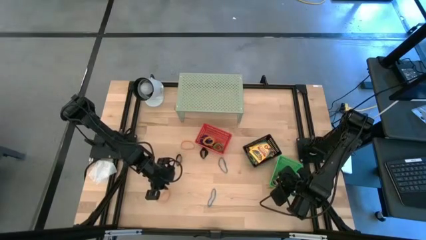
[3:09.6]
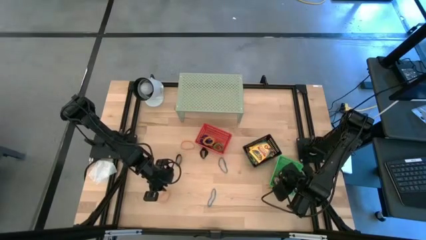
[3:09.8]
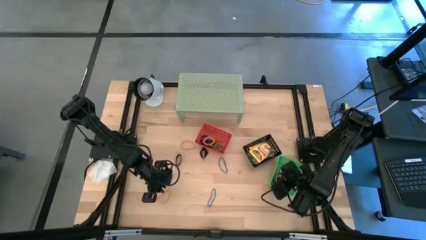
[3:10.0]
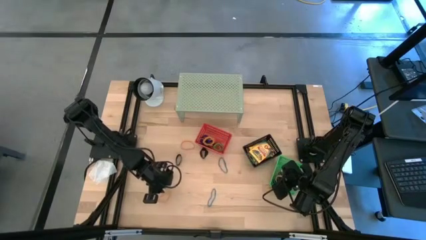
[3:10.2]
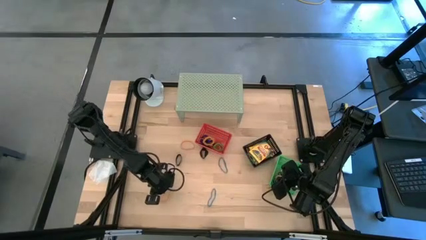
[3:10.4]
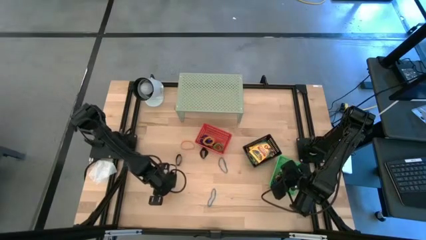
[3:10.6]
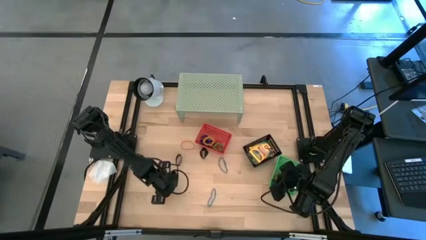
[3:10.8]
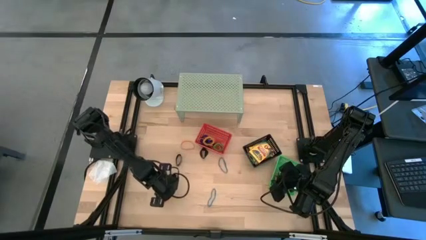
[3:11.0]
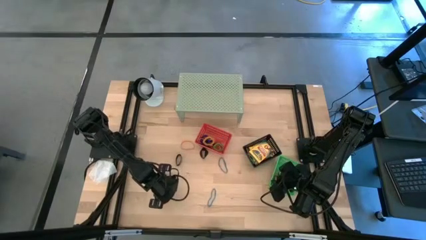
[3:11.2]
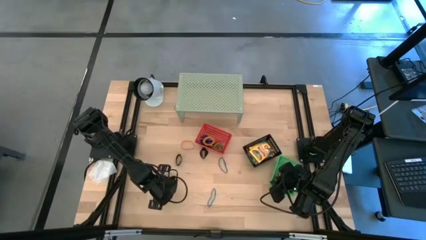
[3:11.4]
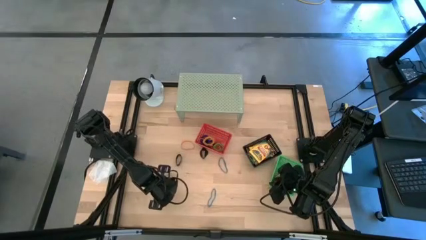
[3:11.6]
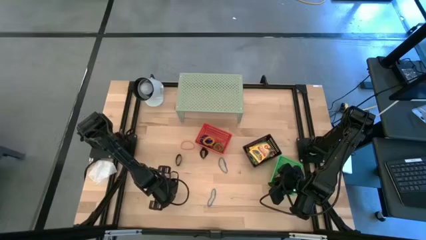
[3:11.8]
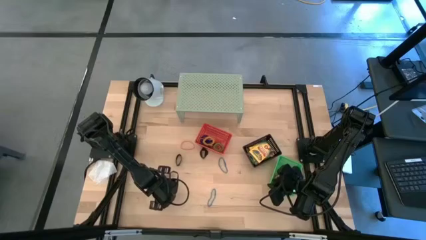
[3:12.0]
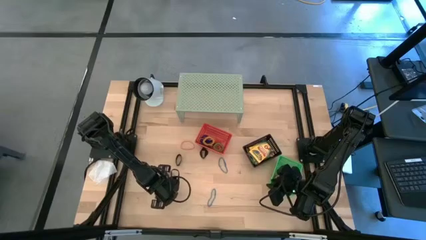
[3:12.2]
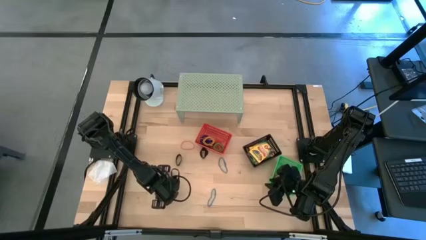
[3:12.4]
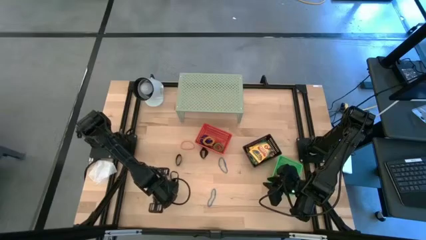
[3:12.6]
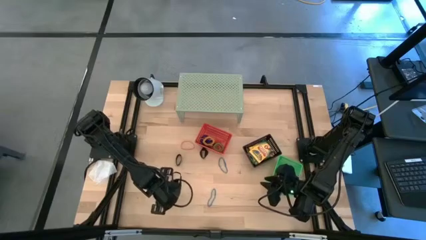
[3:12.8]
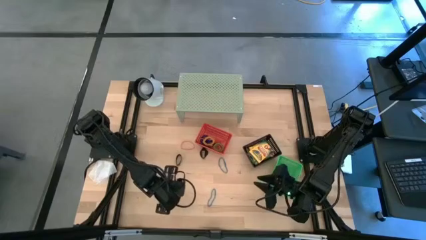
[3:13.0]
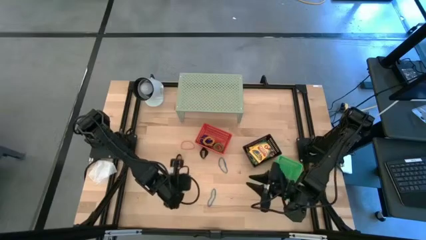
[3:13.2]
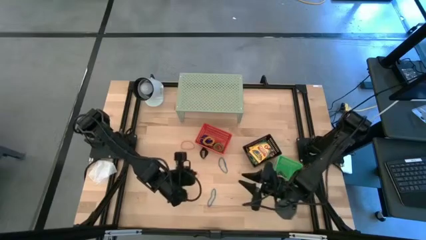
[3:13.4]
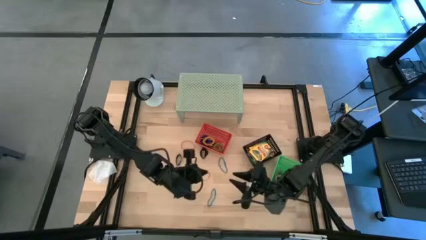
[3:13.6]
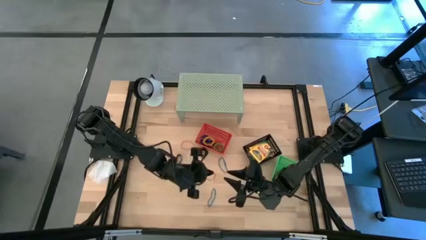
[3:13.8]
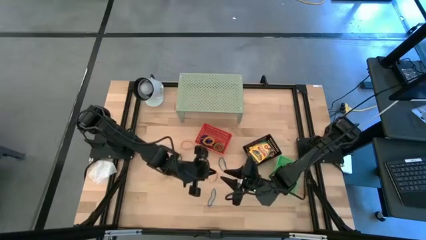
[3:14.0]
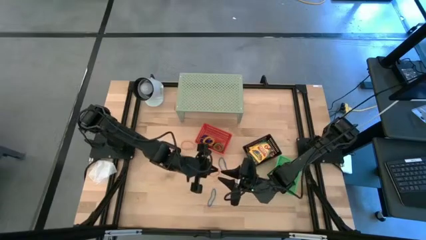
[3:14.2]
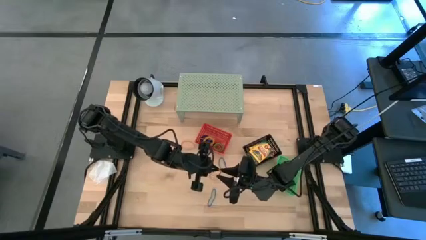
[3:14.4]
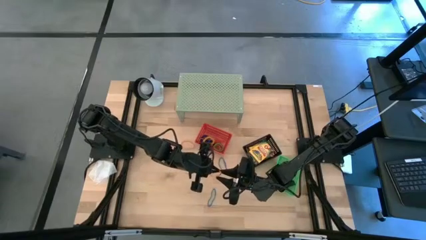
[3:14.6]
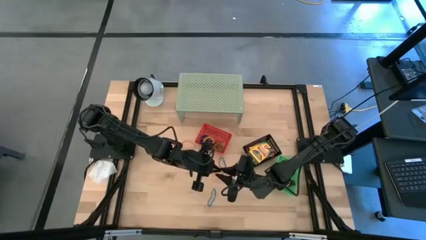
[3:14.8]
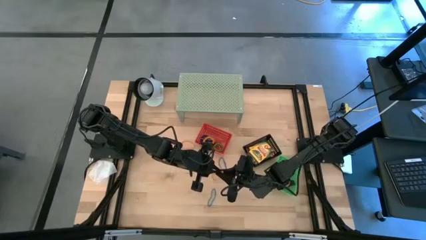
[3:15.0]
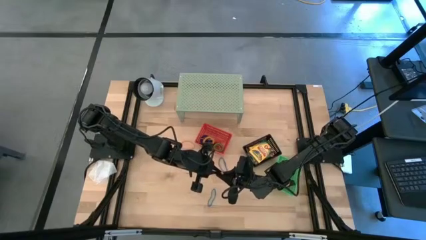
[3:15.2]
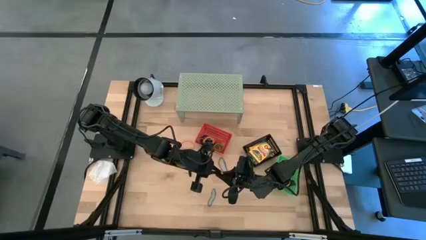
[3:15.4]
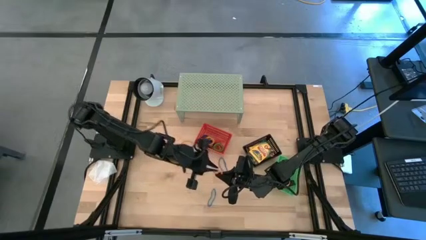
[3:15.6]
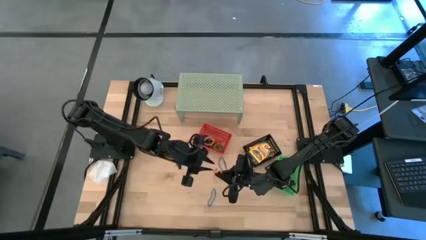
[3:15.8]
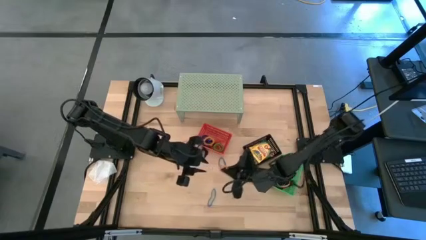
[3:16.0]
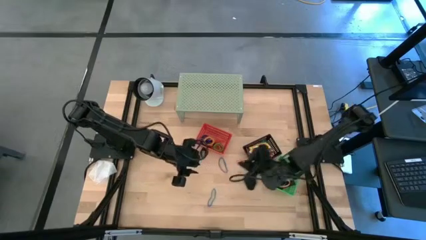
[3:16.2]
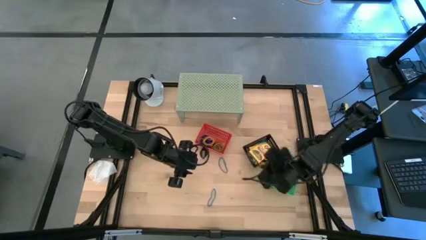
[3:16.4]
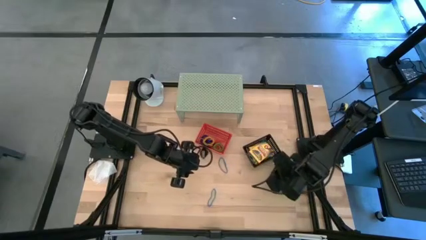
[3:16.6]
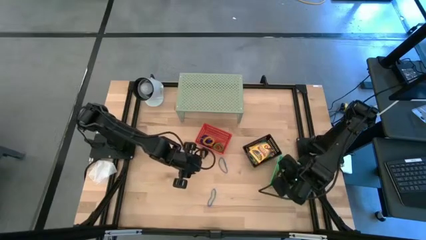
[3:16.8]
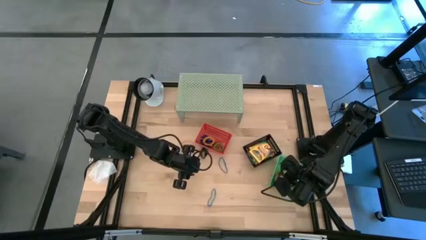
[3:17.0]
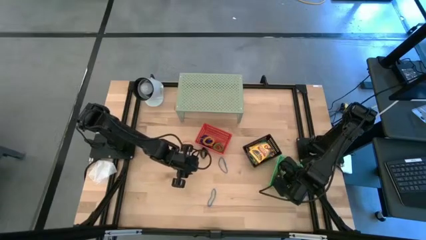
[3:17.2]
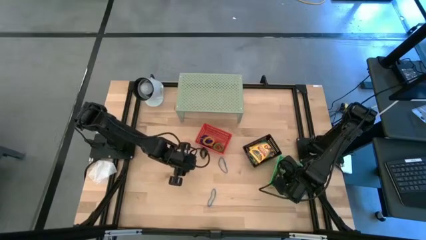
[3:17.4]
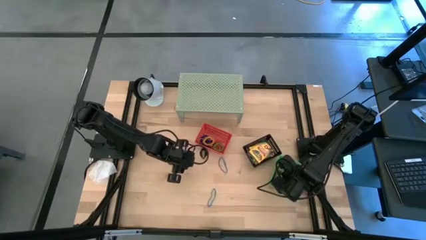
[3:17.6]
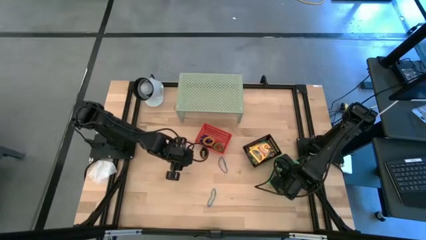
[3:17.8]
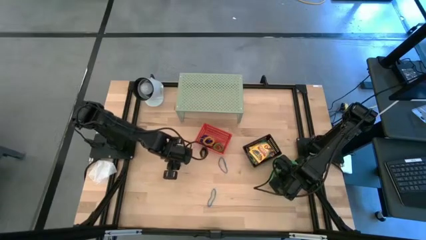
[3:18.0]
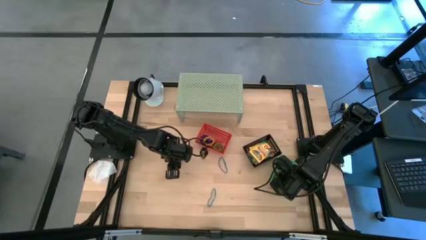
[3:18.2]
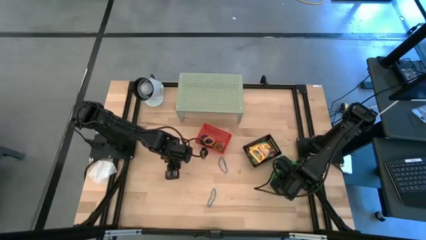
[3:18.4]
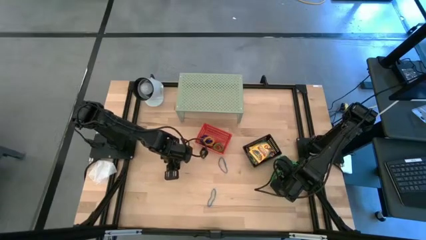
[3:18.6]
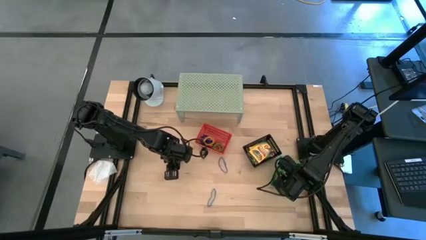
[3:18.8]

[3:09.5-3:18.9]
Task: Pick & Place Office Desk Supplies
Put the orange rubber band into the green bin

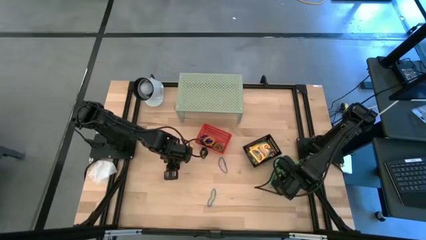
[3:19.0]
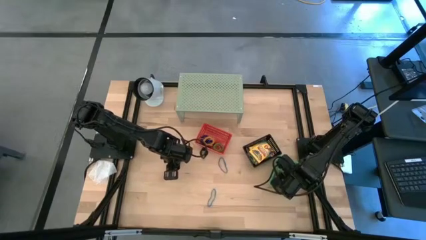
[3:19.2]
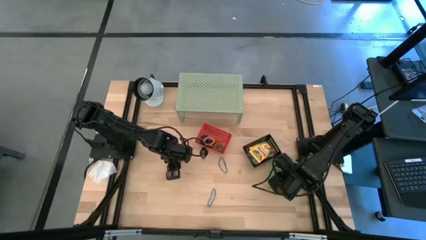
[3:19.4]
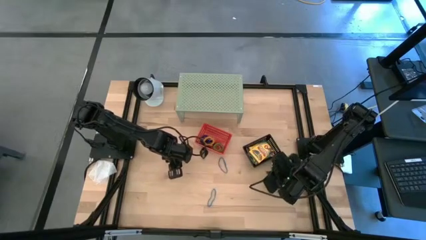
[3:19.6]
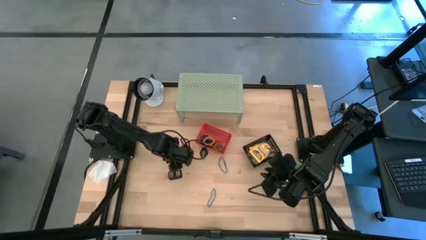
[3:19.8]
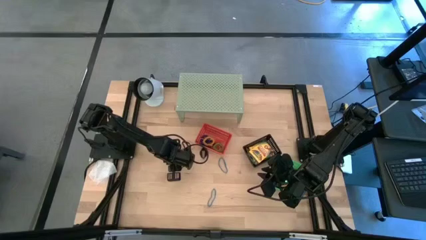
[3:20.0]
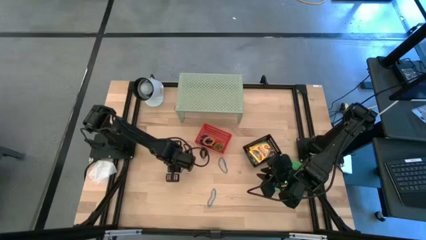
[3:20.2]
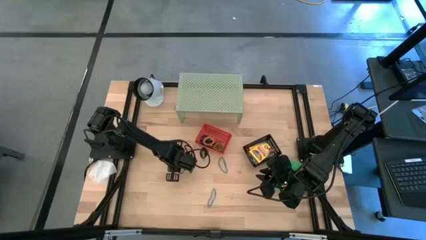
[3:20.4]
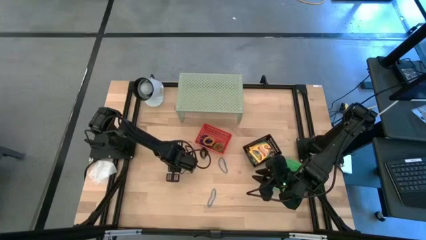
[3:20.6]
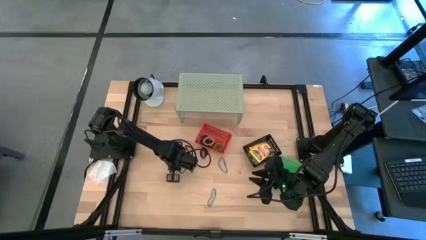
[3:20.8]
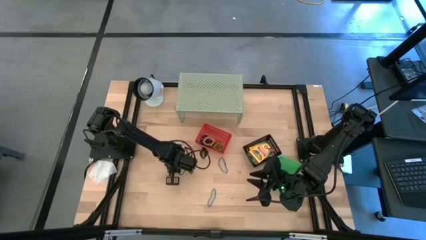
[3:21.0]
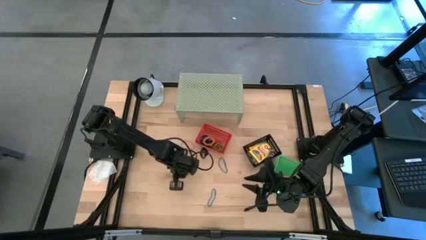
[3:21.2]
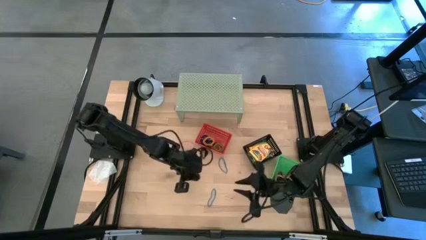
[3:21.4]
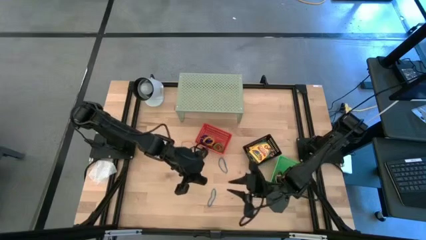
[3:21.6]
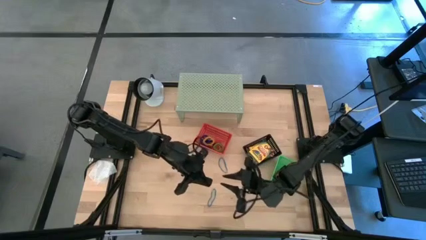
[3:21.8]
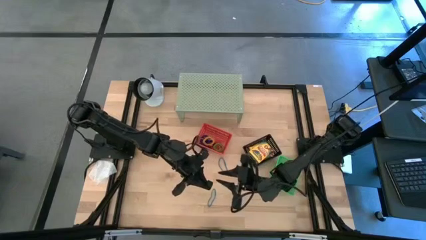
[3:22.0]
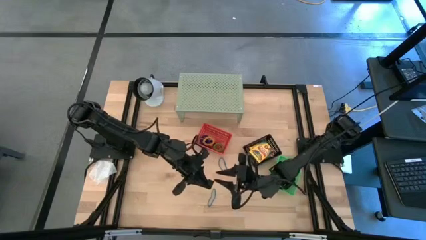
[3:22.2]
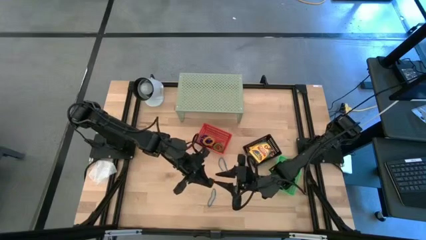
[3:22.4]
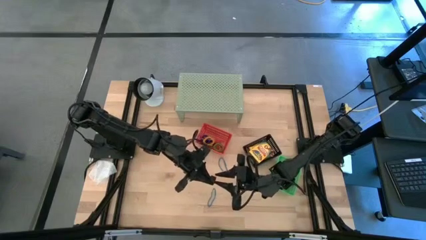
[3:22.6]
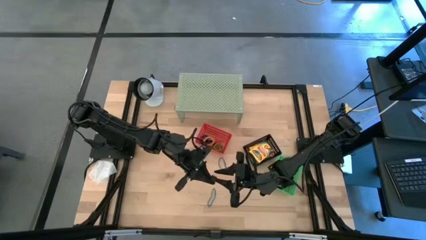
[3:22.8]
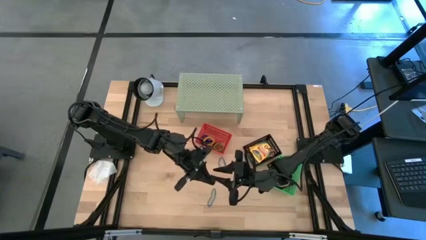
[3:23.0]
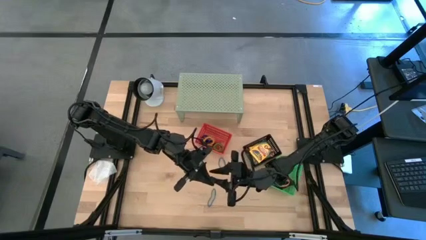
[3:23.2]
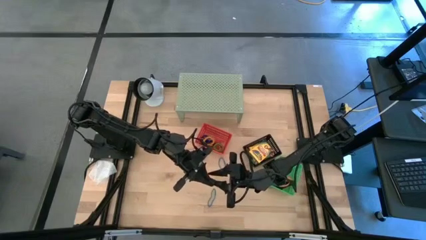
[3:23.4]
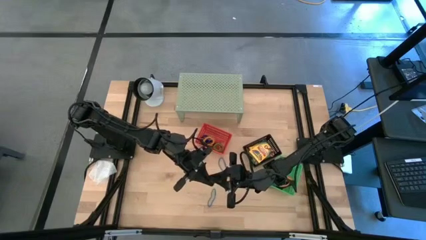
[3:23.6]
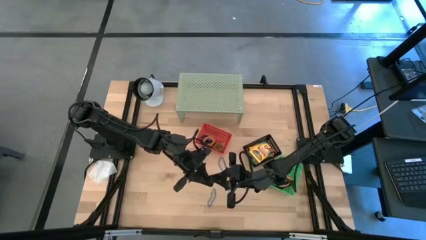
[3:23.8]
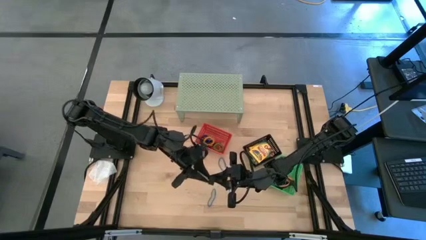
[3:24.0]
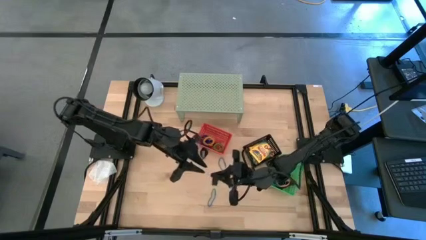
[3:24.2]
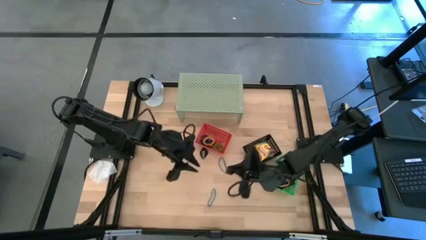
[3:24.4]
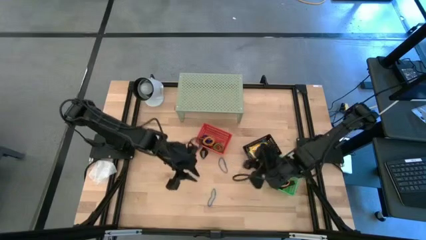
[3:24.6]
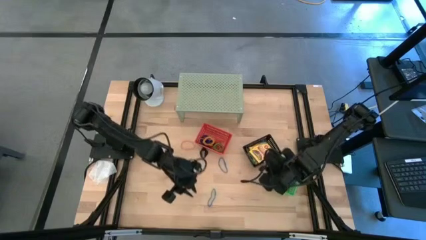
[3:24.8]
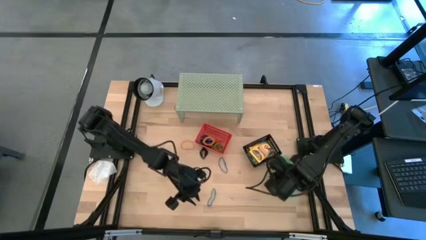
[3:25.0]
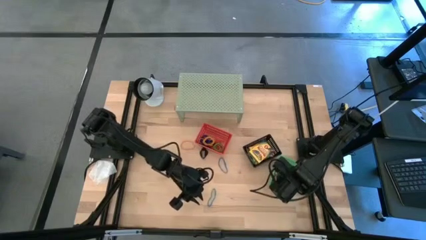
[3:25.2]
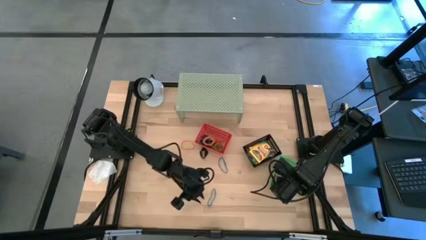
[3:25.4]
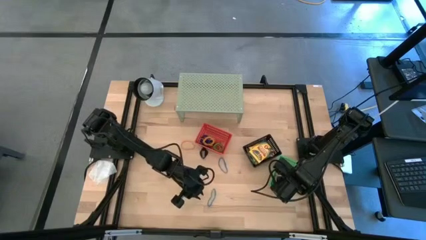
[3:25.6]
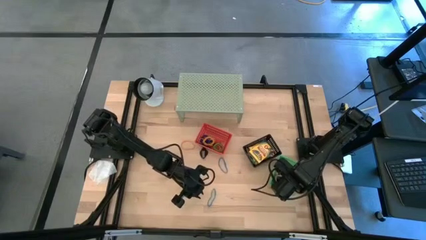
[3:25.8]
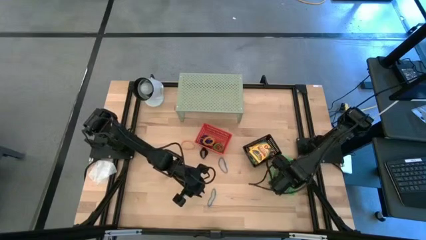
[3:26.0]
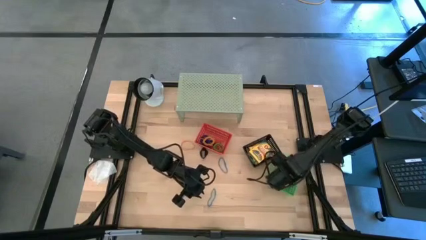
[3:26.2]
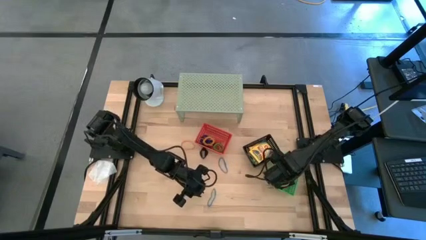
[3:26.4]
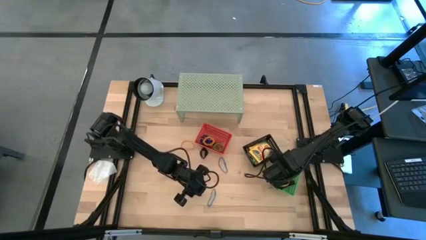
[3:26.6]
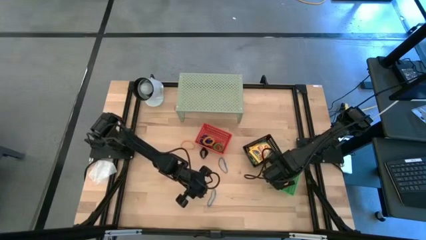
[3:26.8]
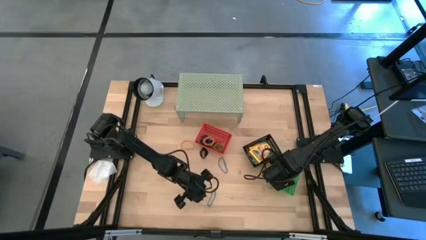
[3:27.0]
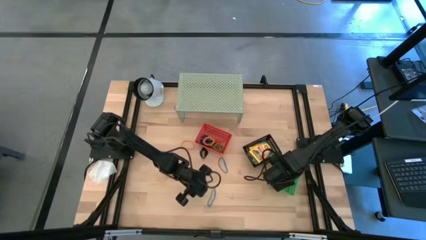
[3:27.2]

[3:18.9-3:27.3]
Put the black rubber band into the green bin
